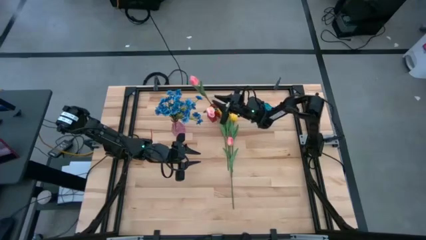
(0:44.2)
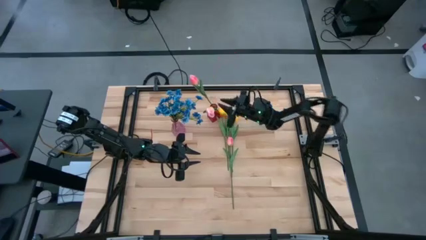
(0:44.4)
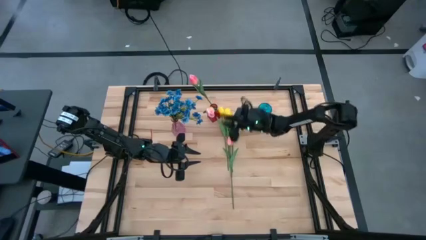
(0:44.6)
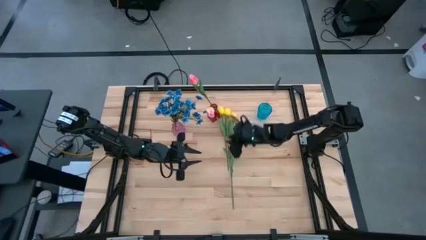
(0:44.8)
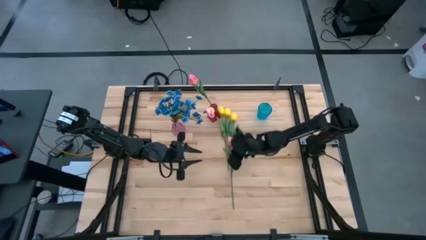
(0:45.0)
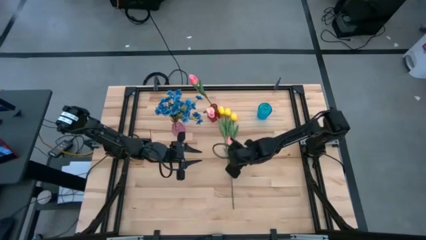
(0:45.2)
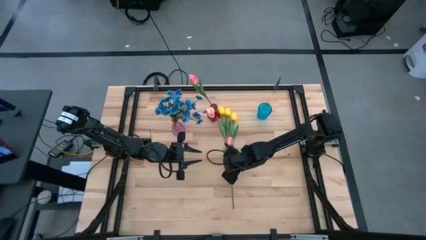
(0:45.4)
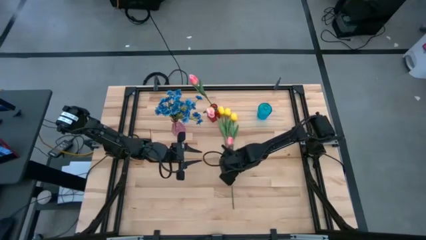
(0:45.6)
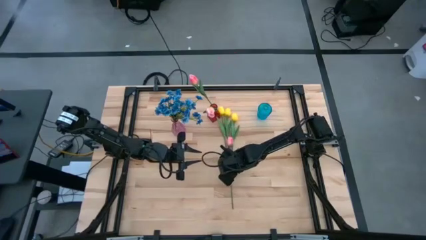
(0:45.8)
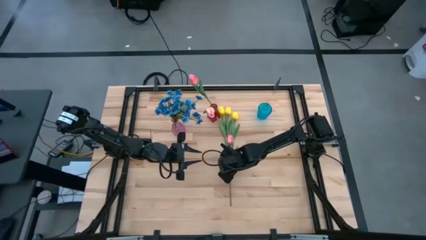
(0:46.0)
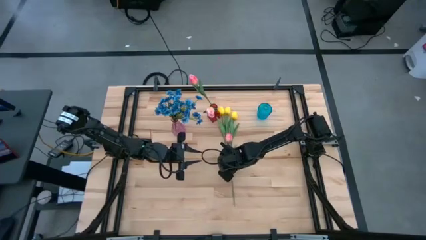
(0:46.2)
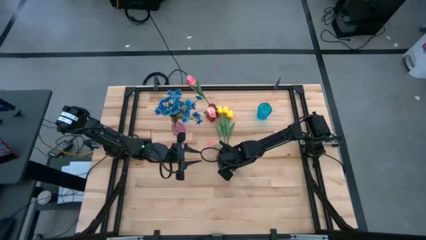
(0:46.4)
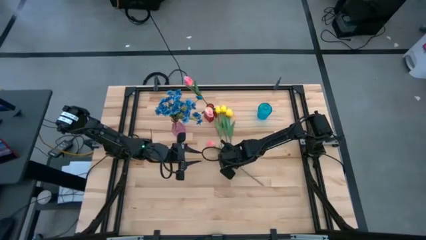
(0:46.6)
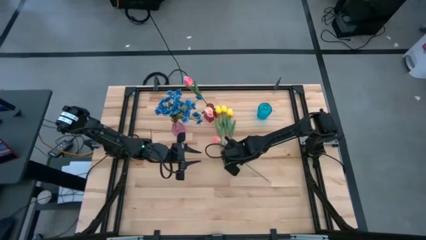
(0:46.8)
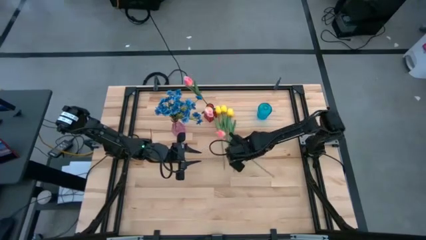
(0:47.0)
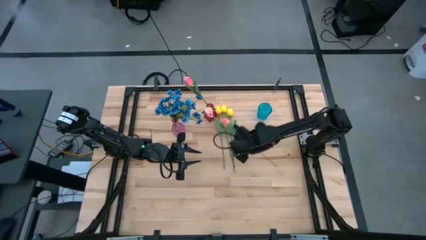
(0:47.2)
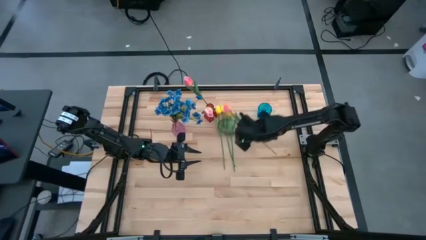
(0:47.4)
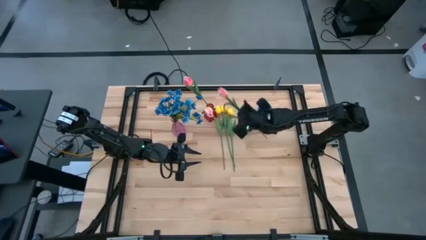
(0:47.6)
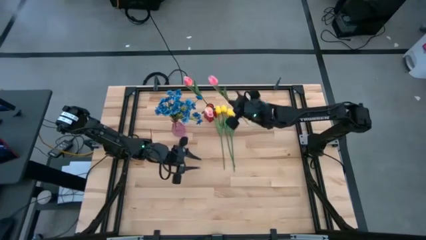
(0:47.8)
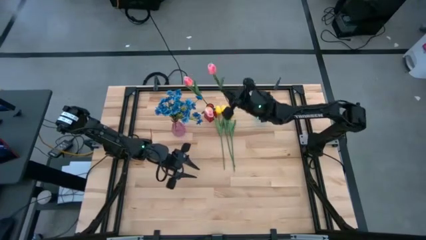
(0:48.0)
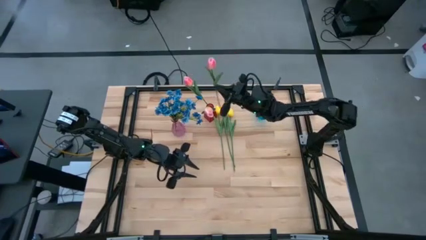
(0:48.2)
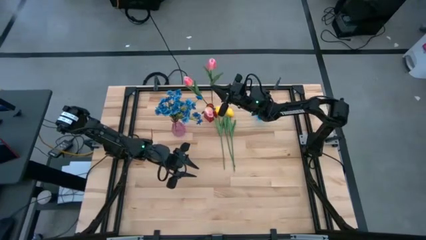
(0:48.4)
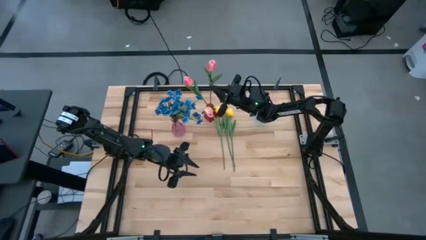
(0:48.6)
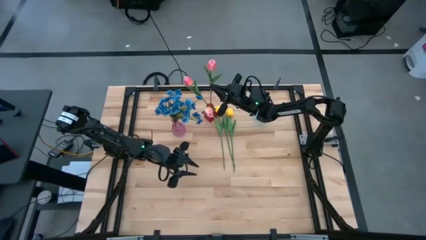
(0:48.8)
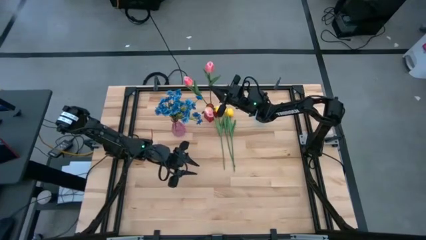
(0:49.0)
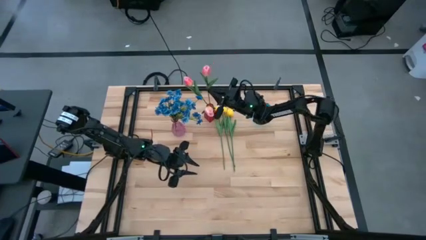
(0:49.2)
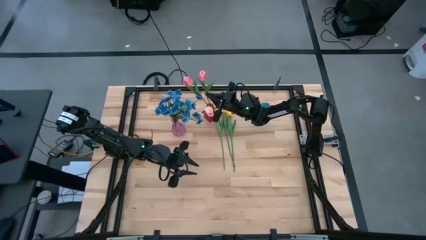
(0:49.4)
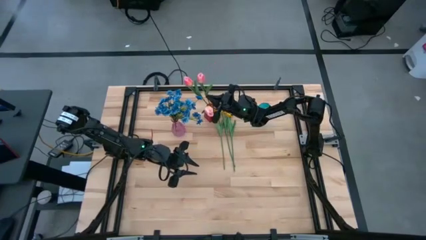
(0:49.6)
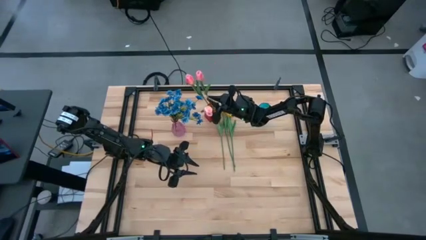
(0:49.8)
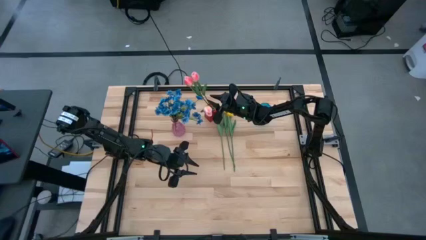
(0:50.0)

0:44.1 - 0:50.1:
Task: Sort flowers into vase by color
Put the pink tulip into the red vase

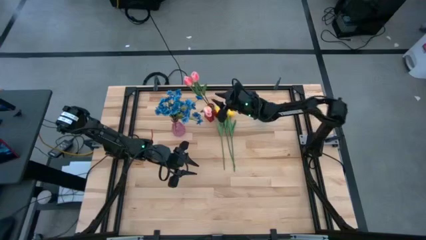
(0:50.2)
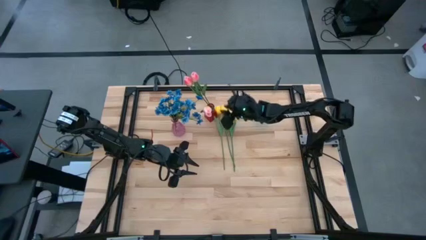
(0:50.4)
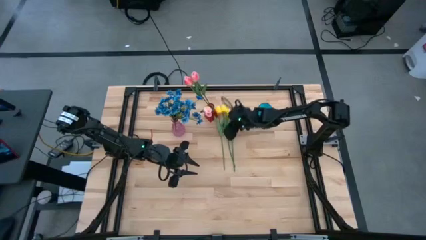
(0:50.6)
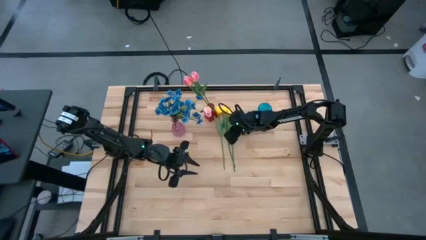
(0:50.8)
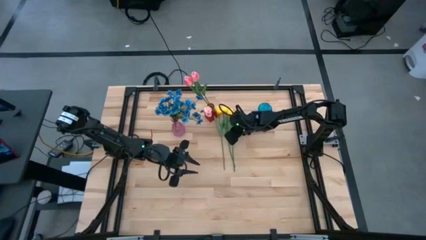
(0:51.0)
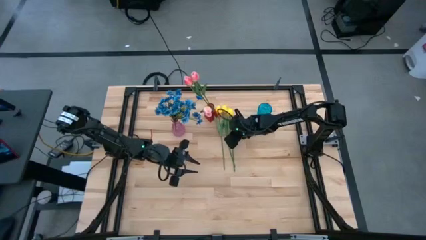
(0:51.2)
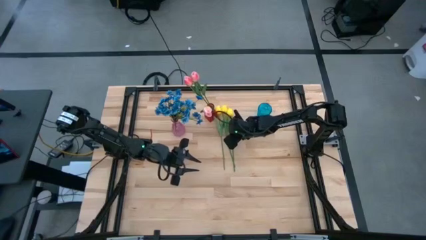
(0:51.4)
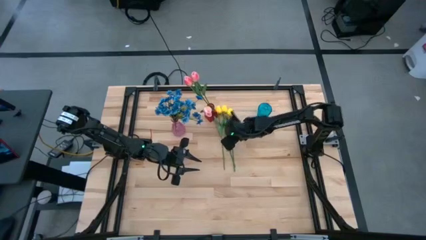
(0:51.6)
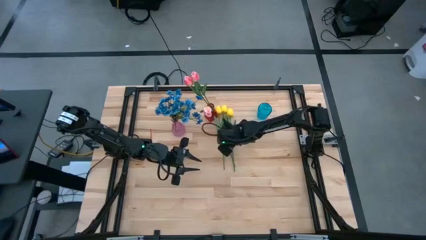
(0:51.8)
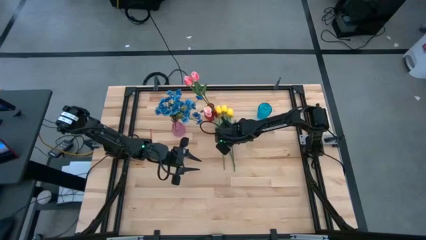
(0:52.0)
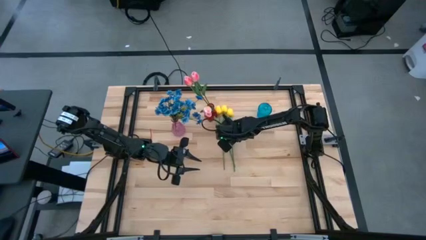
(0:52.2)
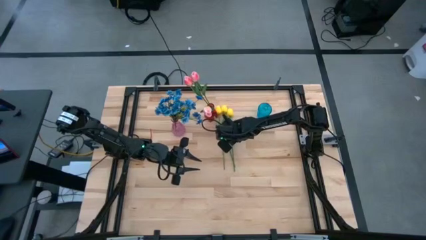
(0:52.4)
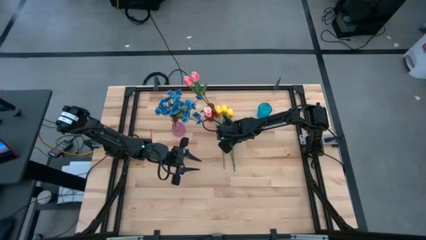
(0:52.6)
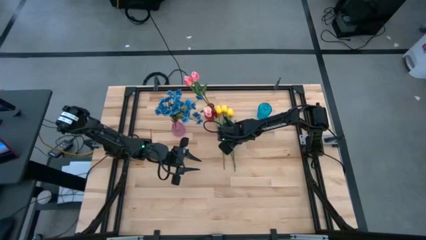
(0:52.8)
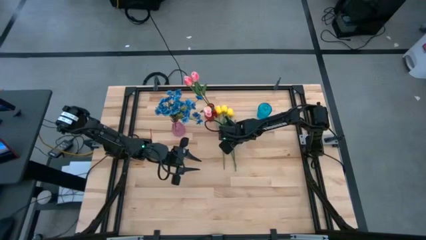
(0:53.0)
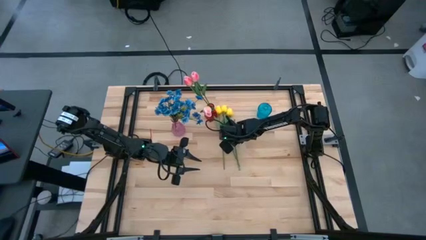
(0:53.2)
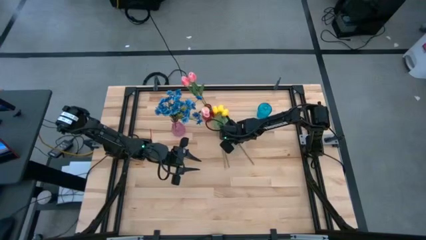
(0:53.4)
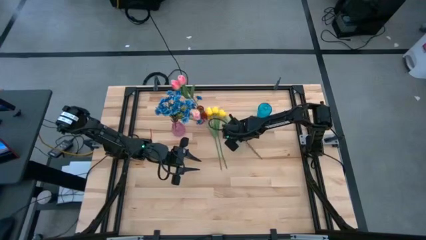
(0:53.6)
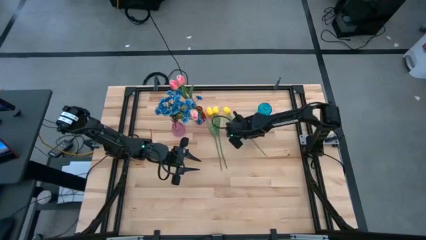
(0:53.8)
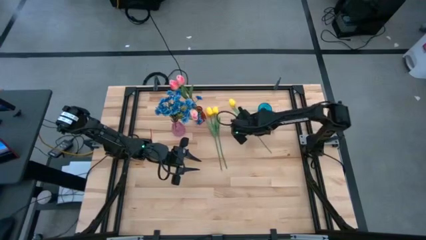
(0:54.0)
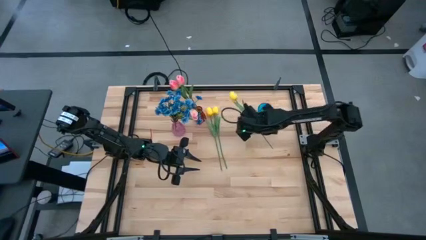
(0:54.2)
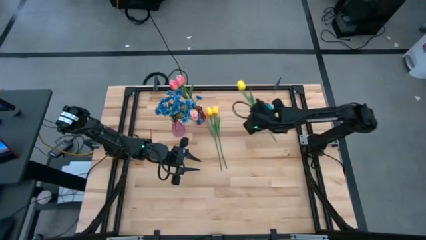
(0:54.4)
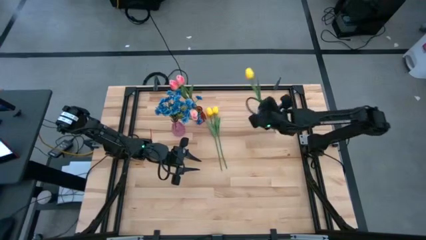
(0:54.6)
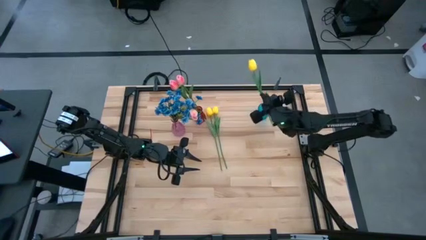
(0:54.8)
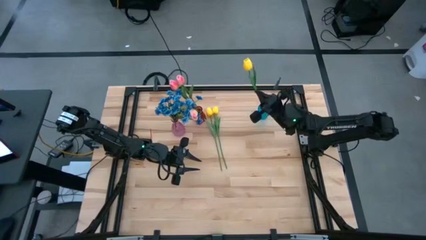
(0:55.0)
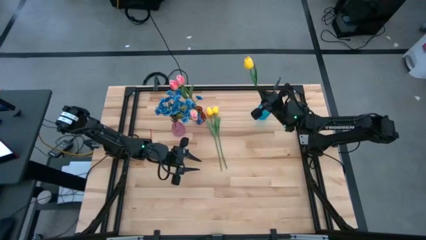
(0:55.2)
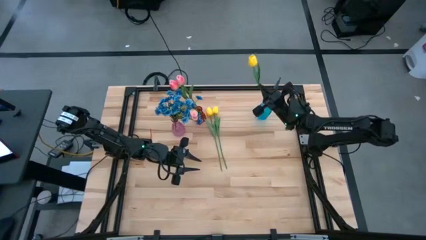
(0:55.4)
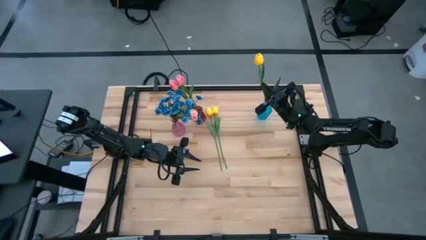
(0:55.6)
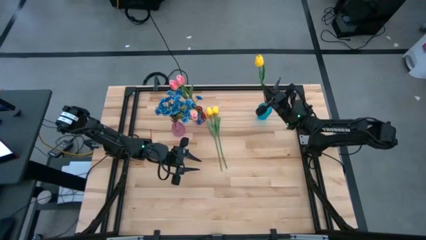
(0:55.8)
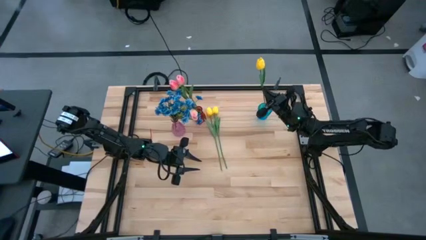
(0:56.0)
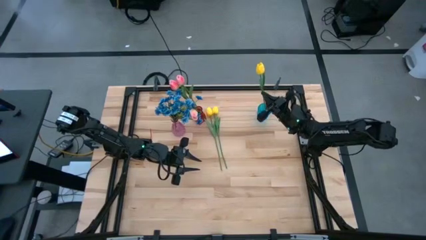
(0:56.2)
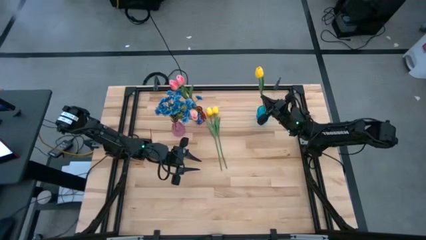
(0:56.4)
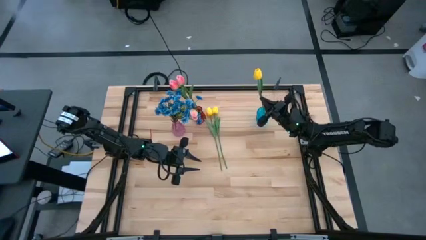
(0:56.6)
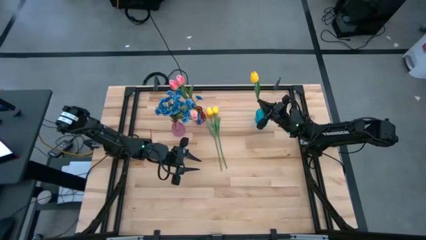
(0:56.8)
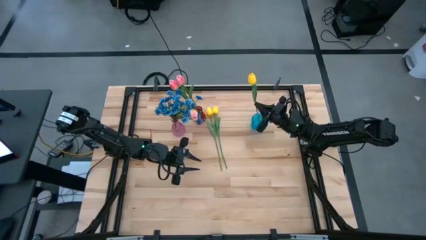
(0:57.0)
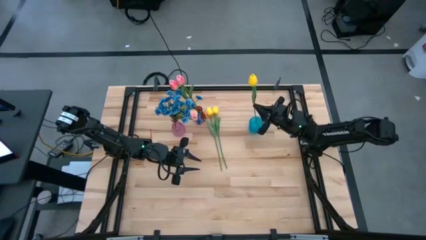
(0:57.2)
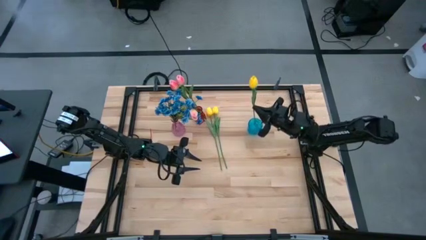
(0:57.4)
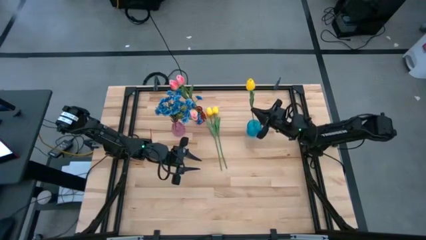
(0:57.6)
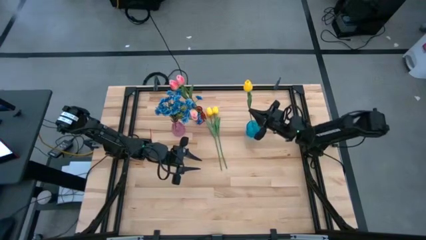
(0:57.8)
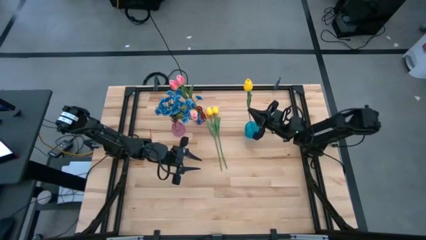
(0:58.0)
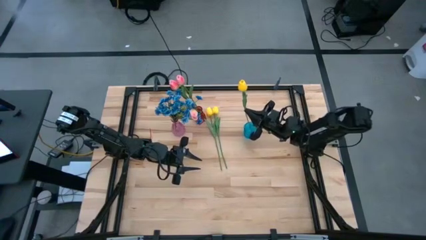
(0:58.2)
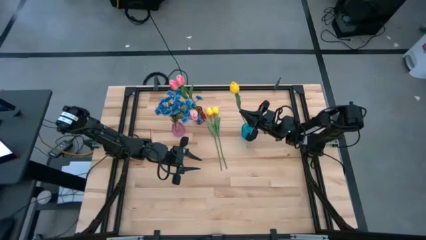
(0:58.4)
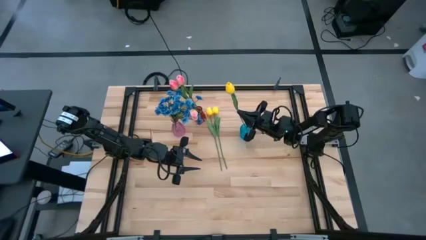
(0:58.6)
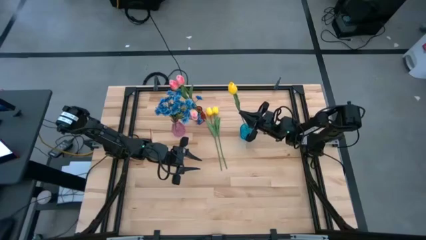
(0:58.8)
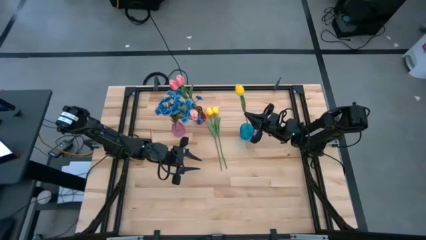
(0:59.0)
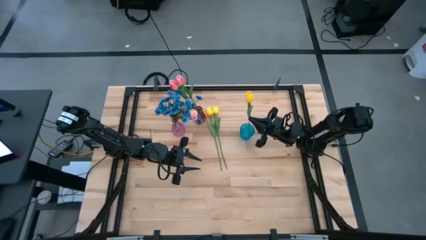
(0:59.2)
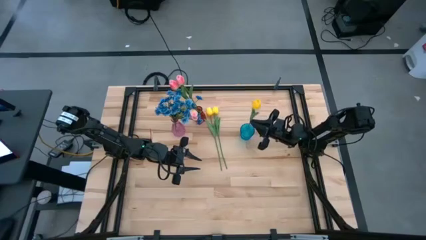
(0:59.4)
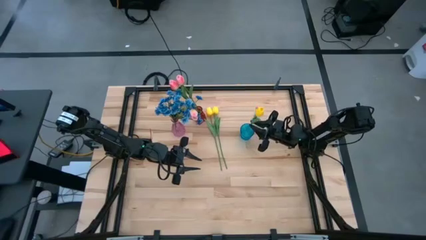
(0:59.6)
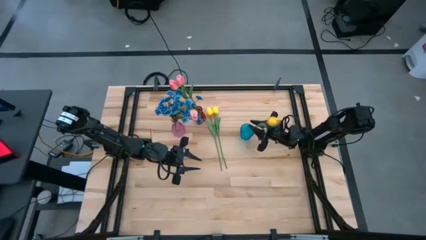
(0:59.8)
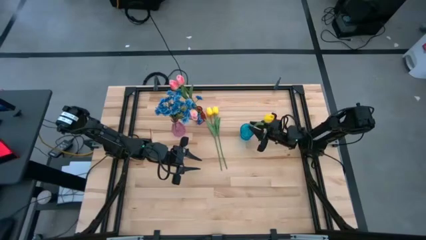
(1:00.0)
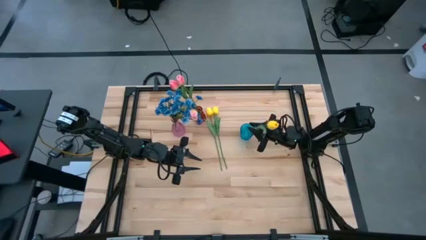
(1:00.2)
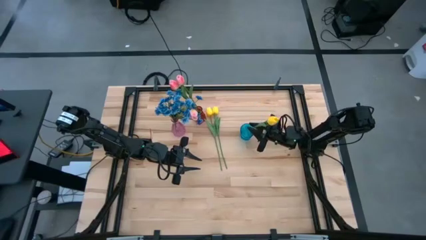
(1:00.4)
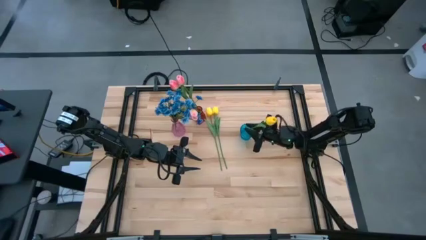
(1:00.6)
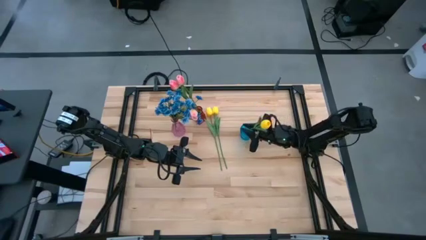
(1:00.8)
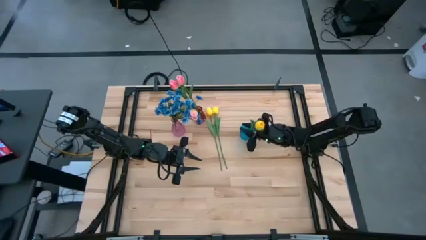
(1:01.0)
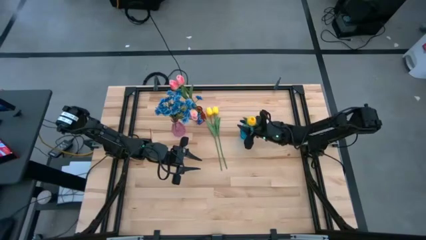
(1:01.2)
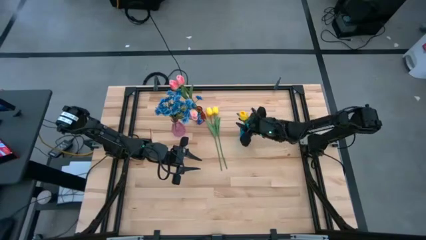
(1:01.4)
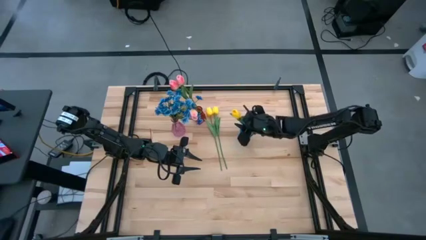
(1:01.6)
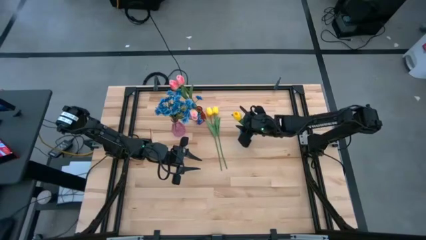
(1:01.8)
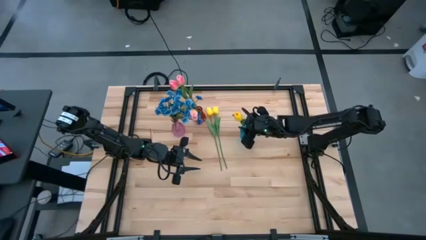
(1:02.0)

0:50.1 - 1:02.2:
Put the yellow tulip into the red vase
